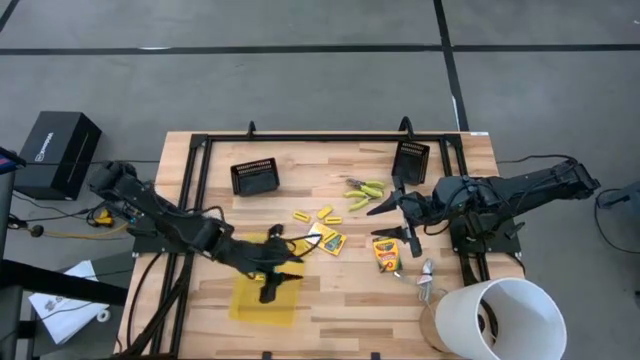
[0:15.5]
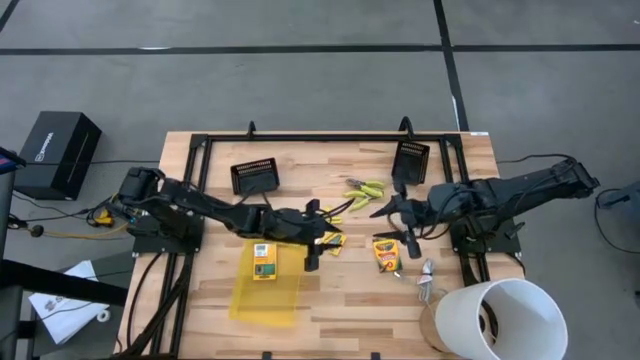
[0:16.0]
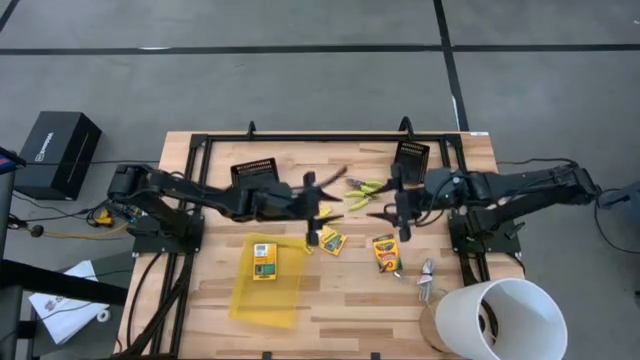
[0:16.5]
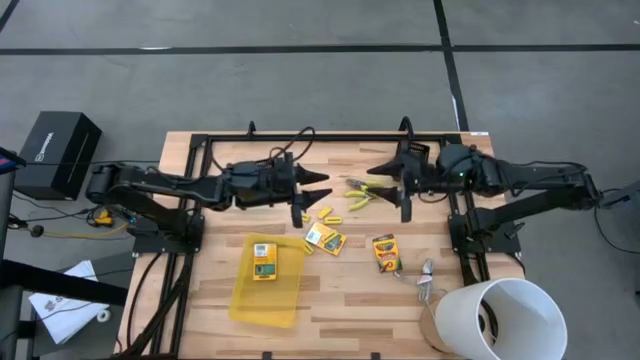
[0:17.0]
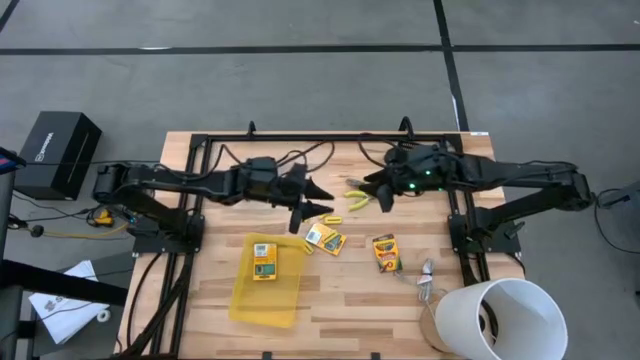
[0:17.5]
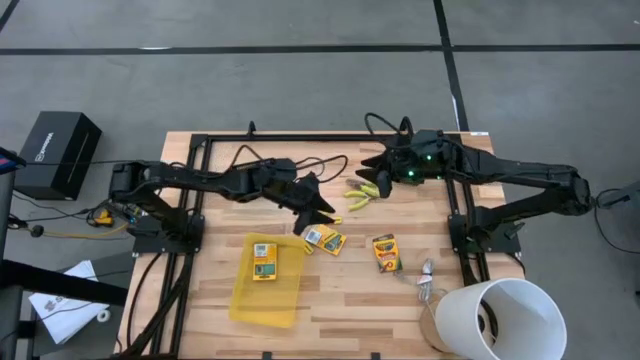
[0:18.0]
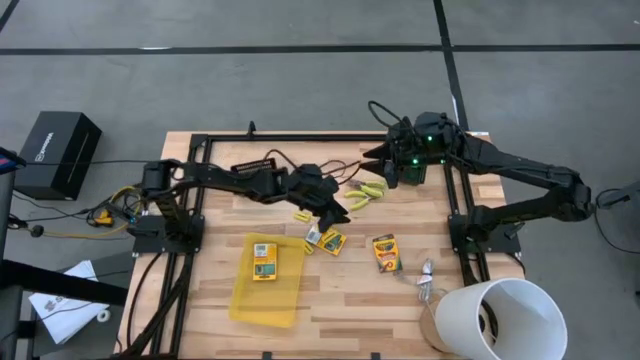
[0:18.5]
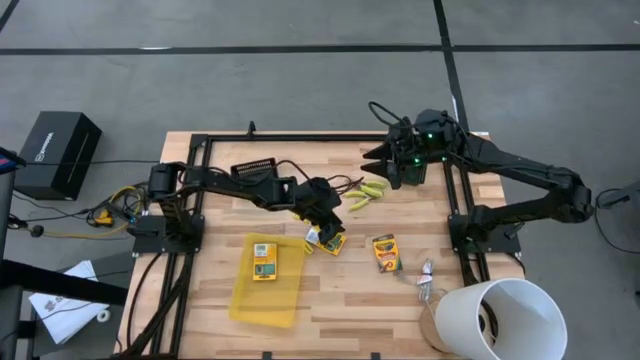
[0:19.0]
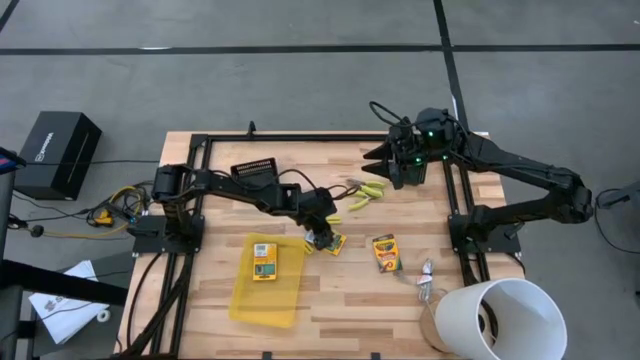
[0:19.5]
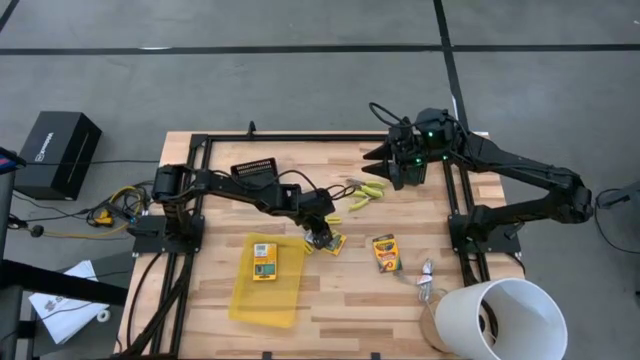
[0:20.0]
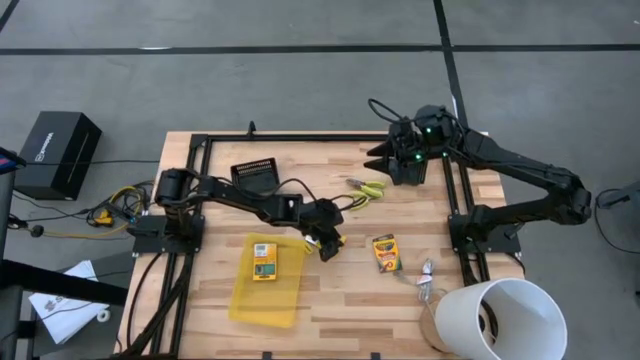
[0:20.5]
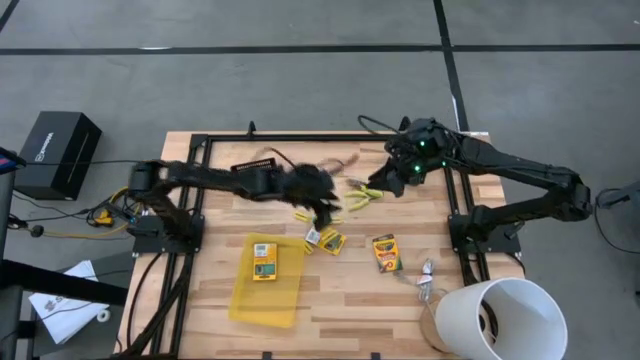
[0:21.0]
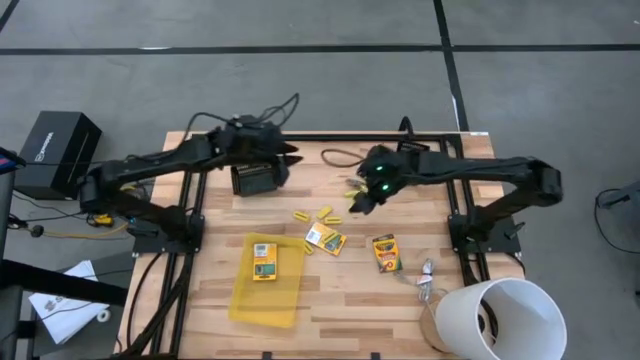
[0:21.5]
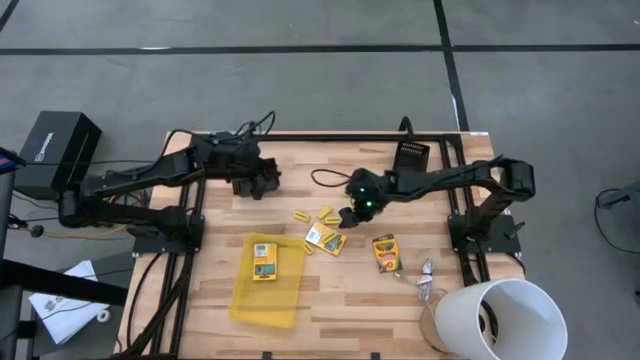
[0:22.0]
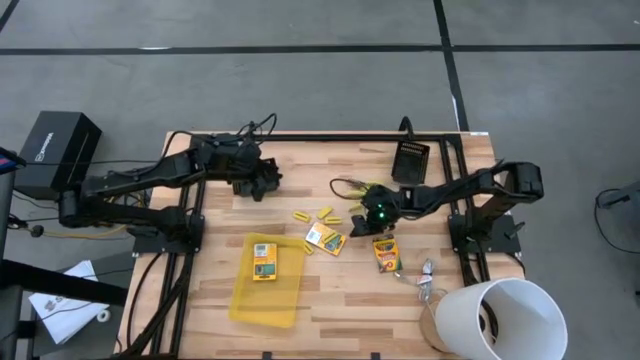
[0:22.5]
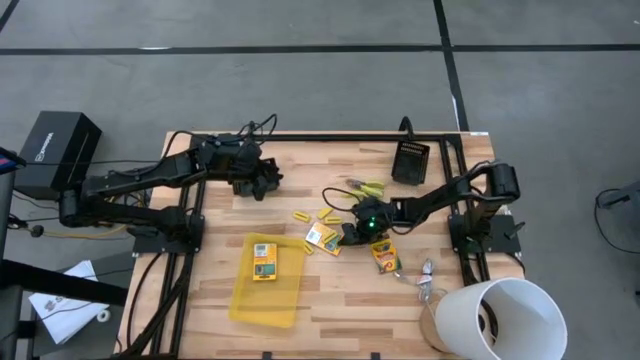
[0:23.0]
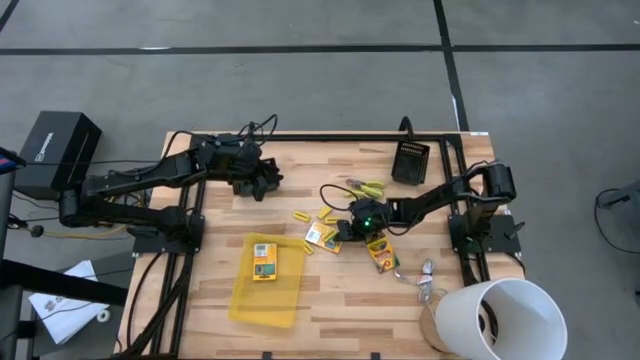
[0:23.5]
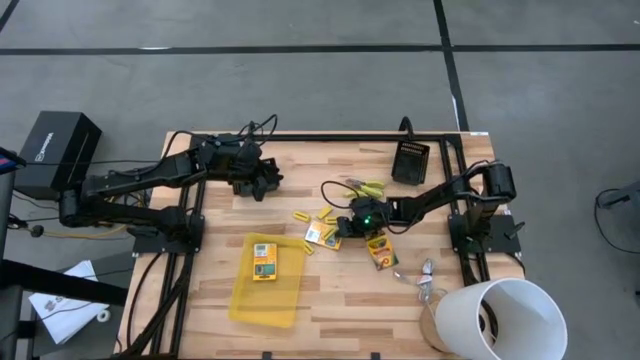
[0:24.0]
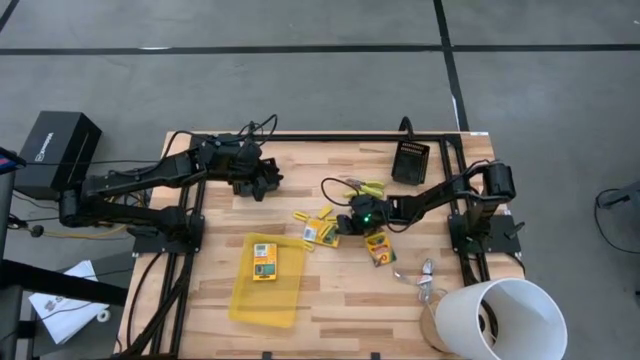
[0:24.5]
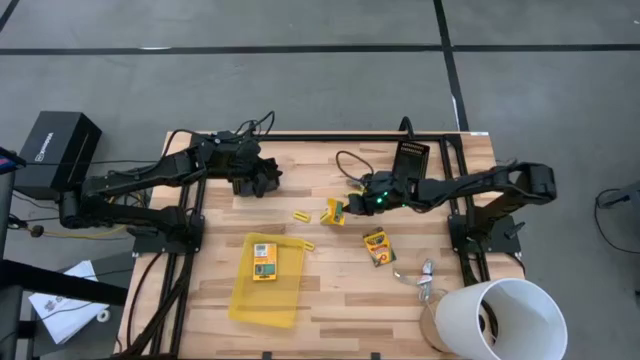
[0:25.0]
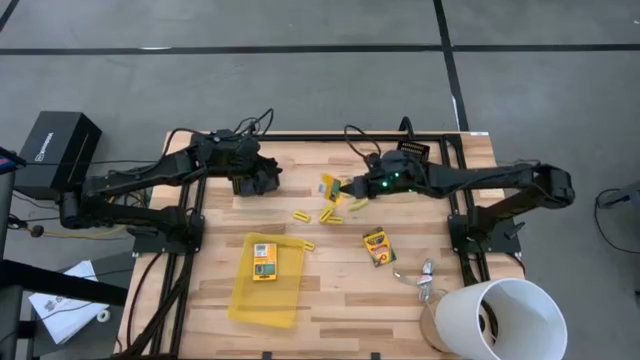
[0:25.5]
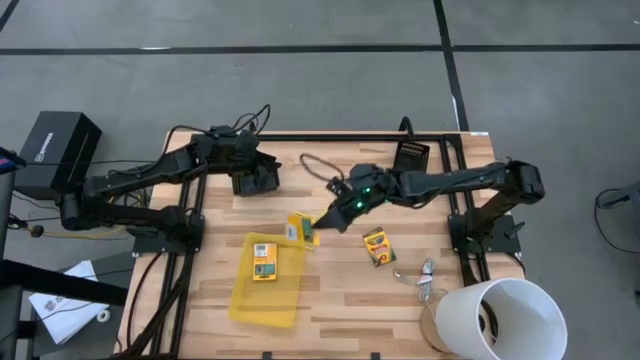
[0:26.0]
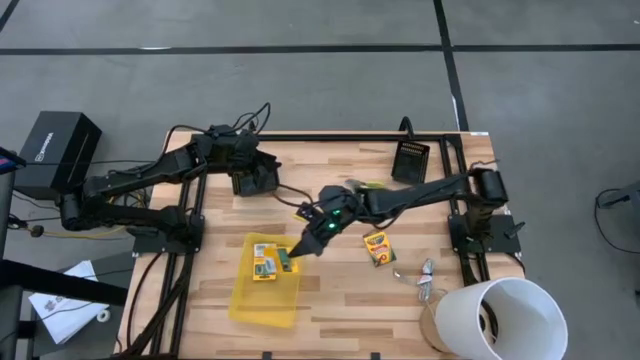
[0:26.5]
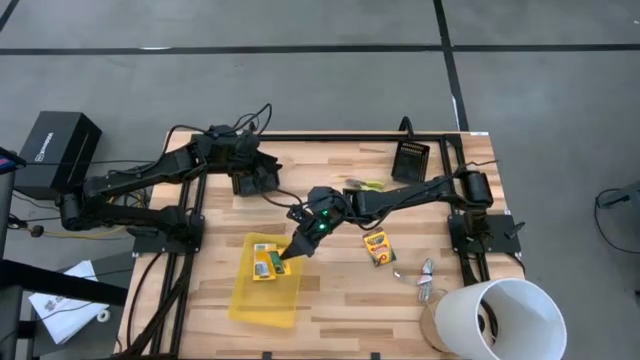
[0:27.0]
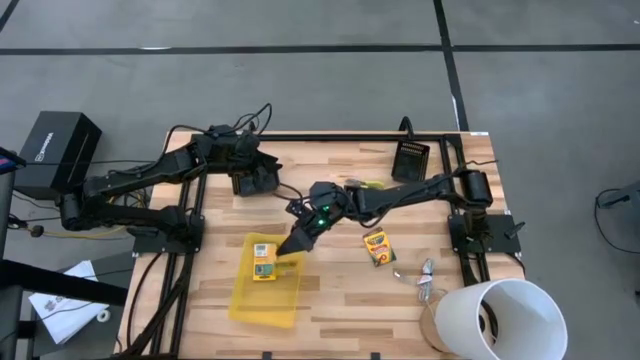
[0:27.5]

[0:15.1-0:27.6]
Task: Pick & Place School Supplies
Put the yellow crayon box into the yellow bin

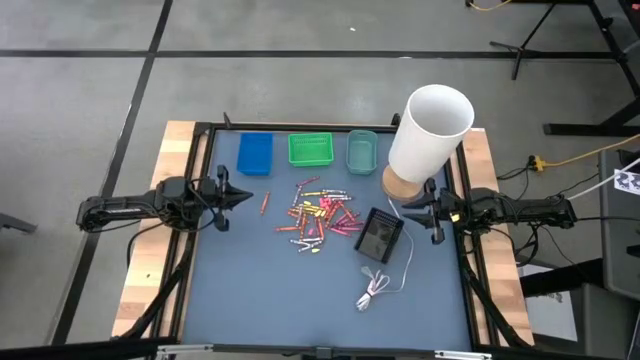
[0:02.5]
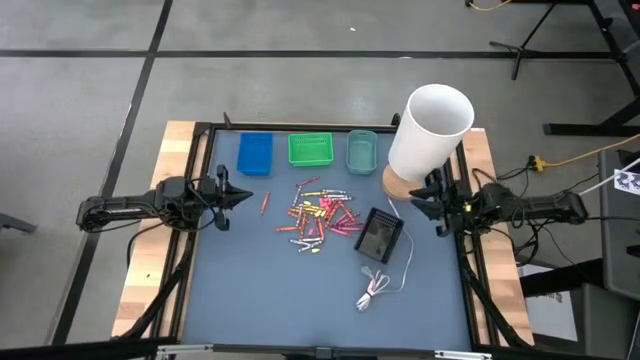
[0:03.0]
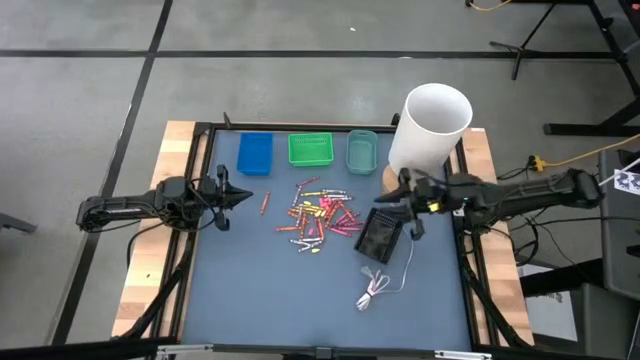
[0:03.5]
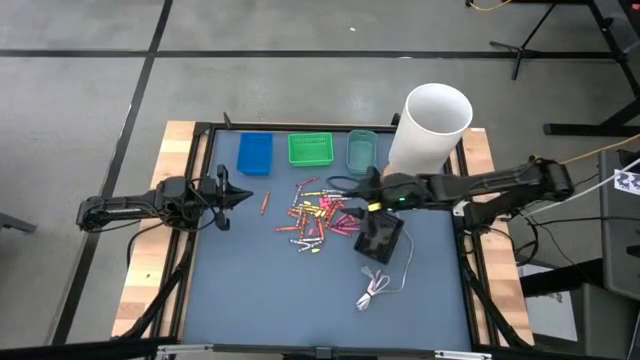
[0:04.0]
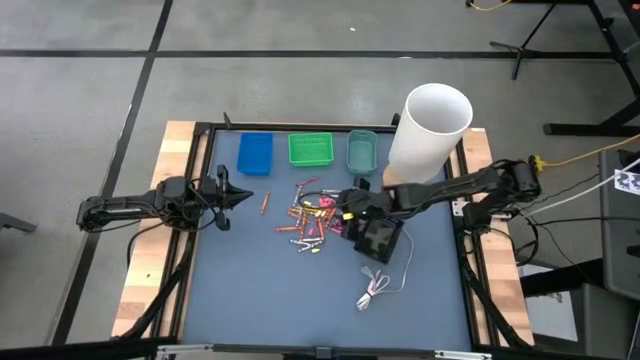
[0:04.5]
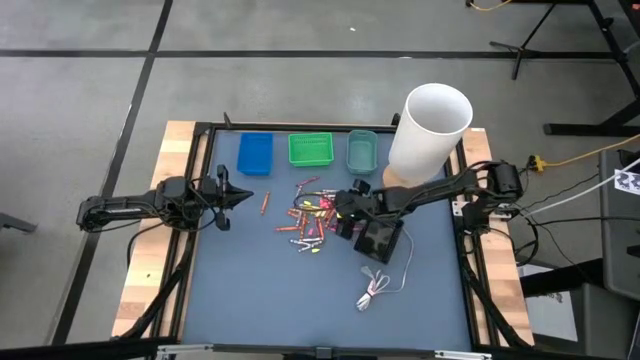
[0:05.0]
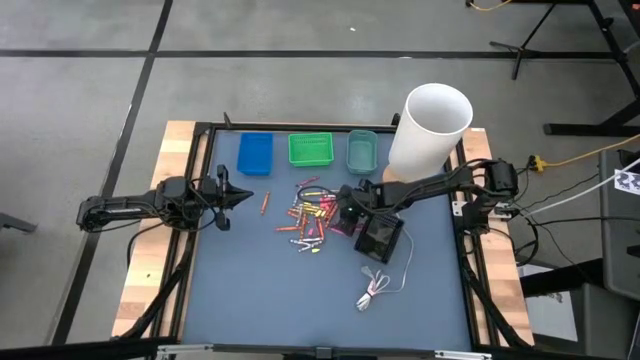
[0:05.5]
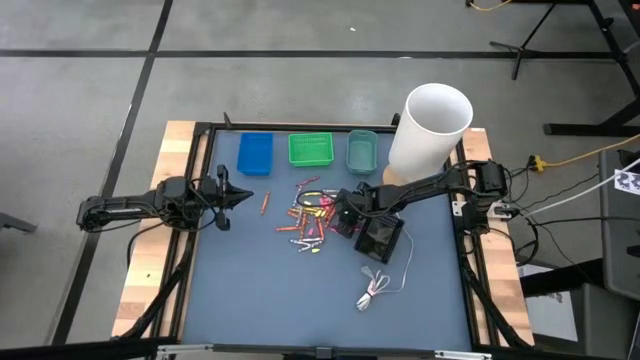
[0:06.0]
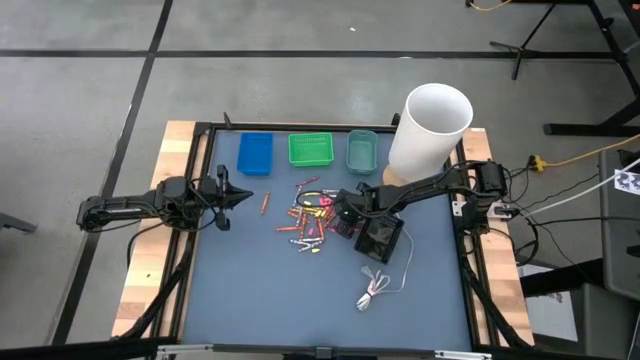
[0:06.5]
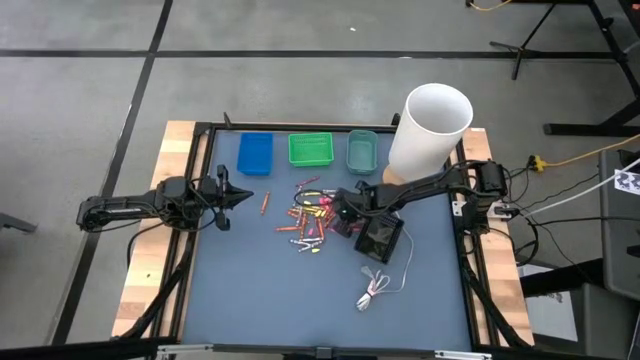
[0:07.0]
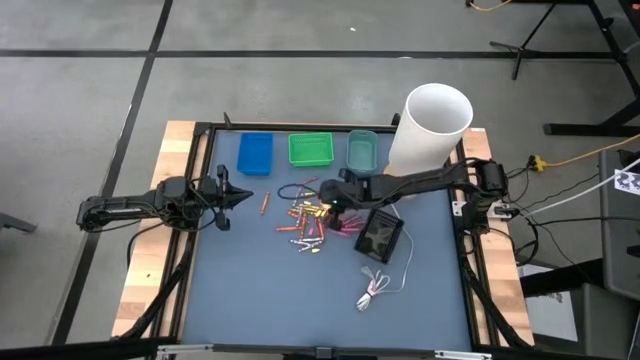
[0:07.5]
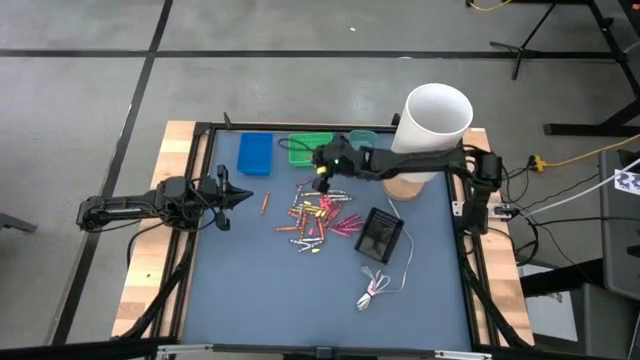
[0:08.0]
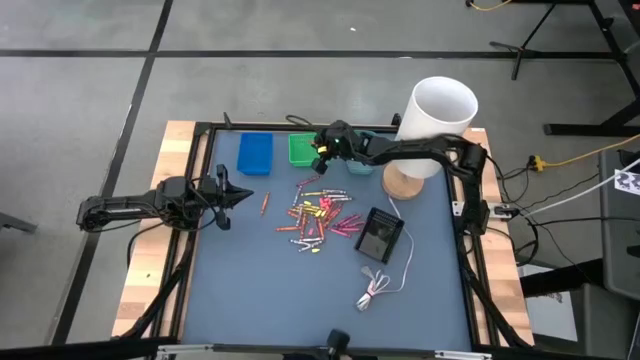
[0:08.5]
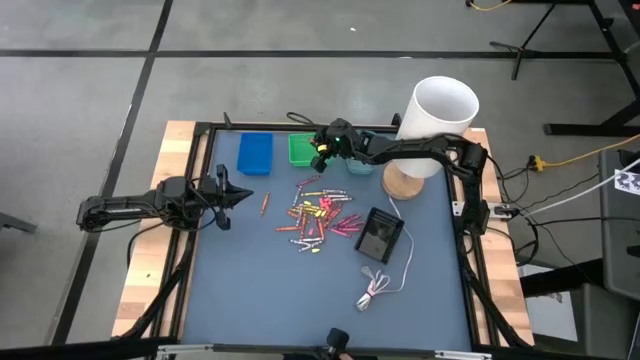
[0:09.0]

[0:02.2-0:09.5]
Task: Sort crayons
Put the orange crayon into the green bin
